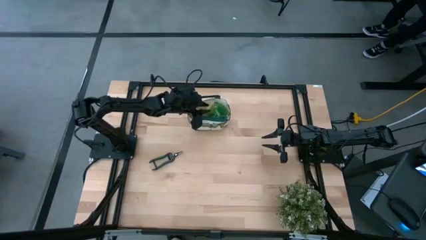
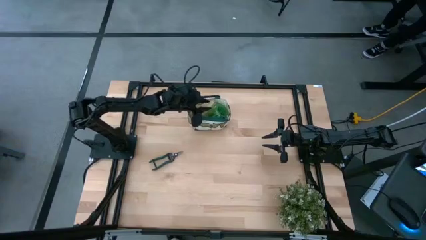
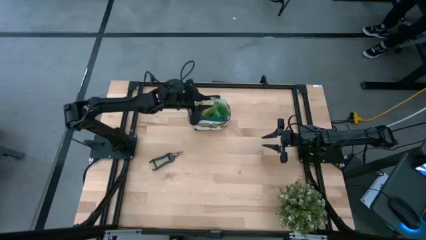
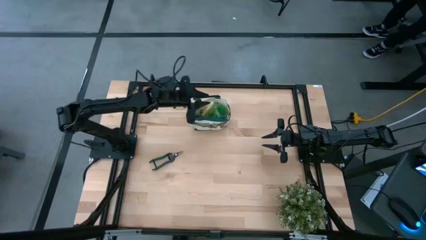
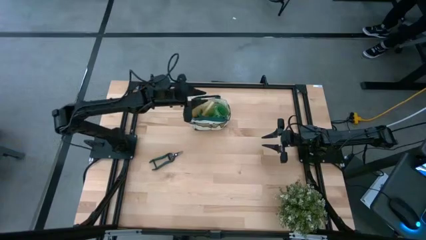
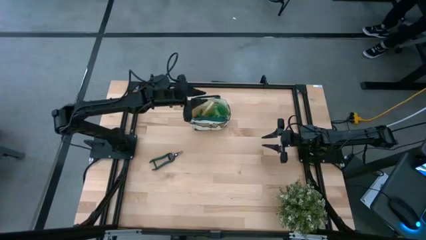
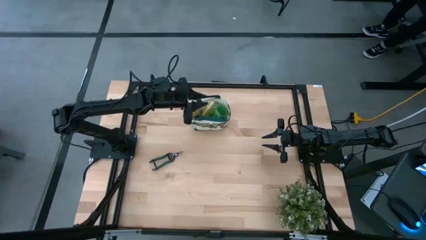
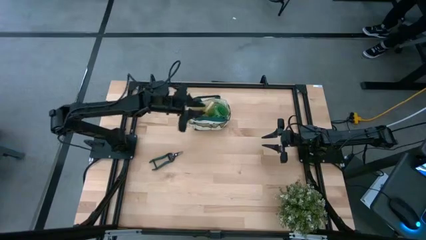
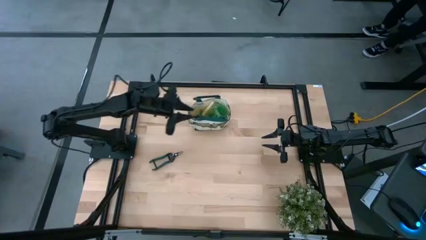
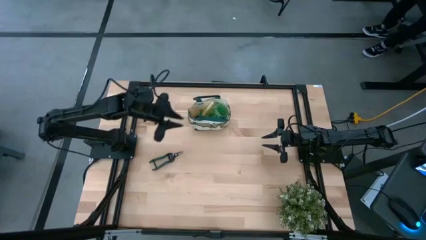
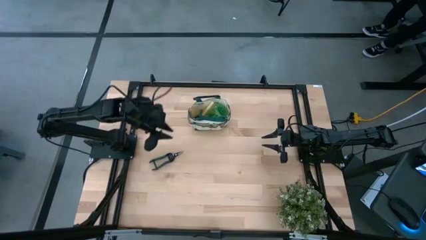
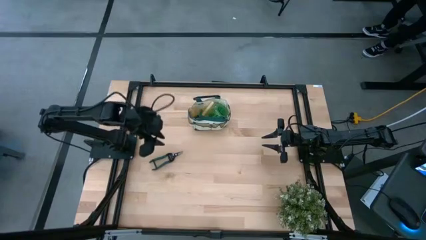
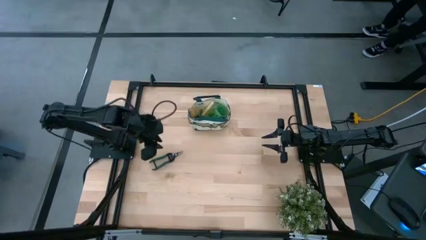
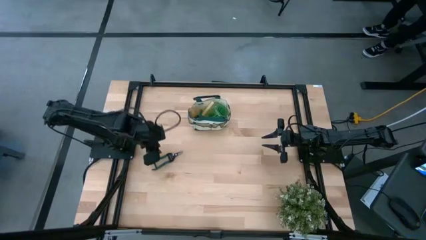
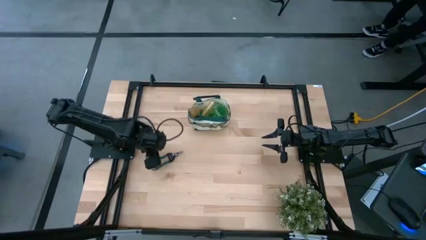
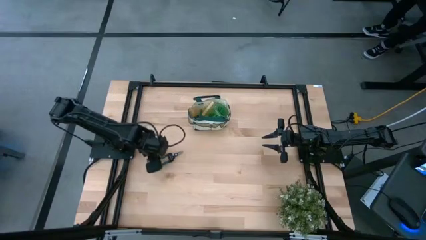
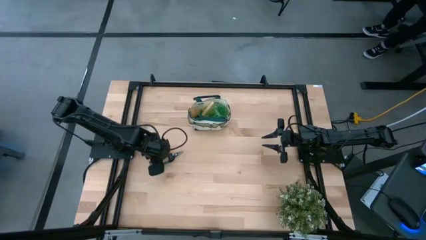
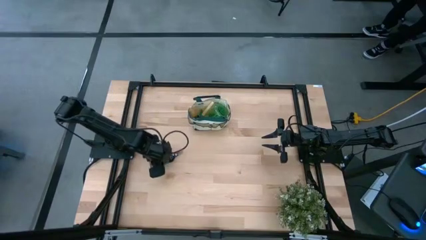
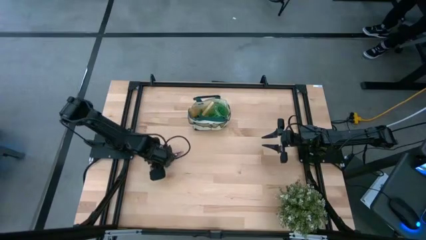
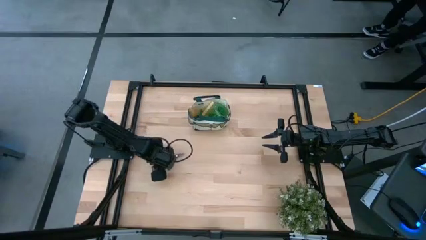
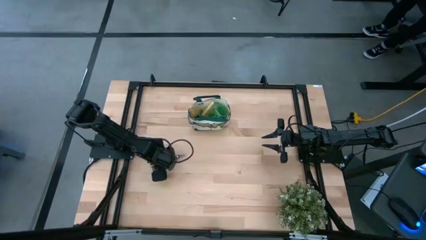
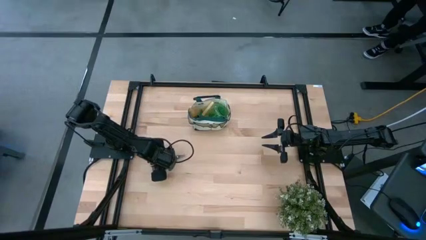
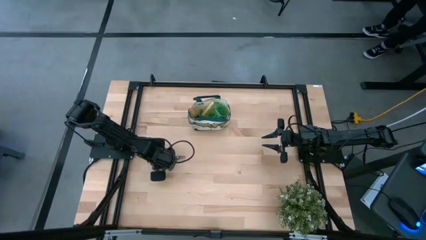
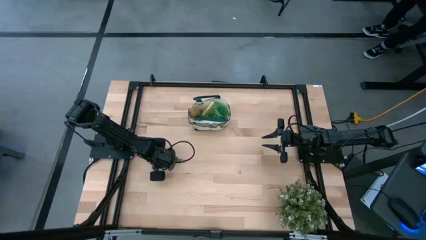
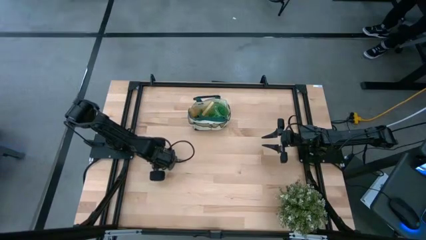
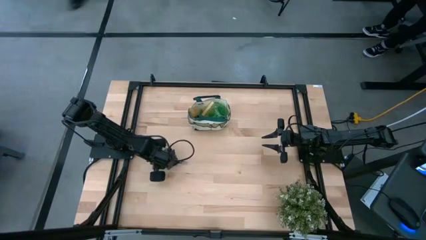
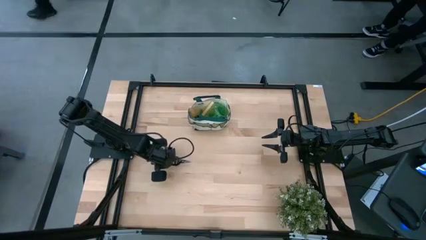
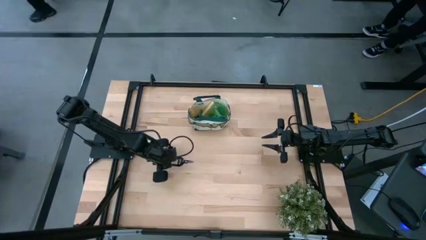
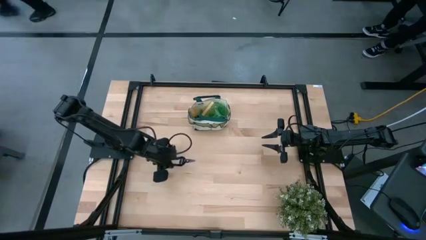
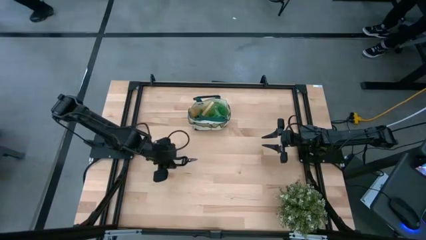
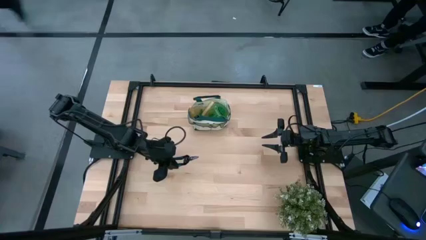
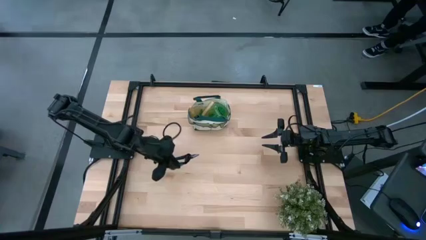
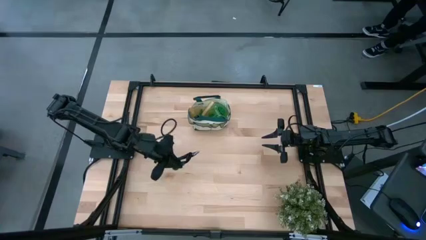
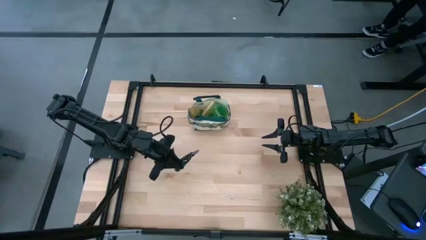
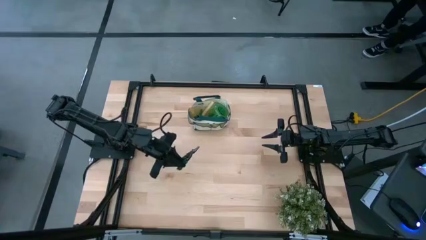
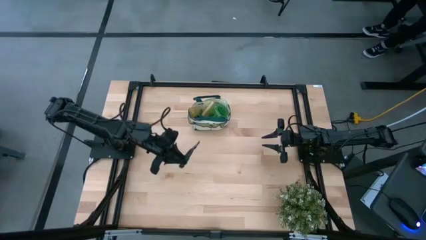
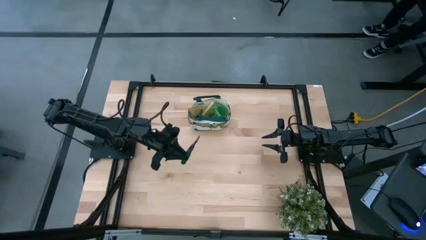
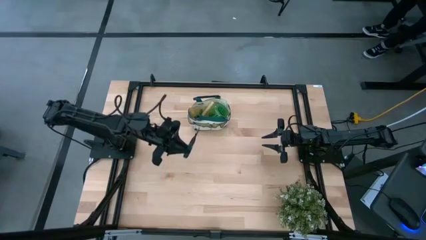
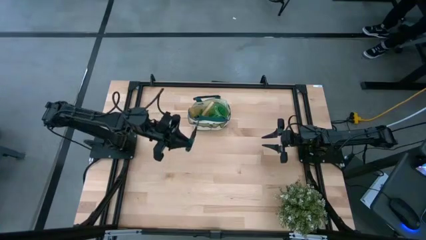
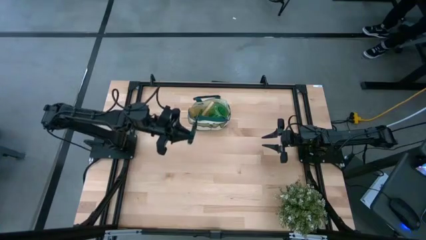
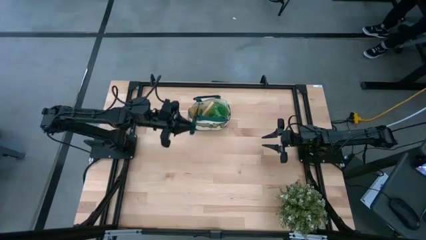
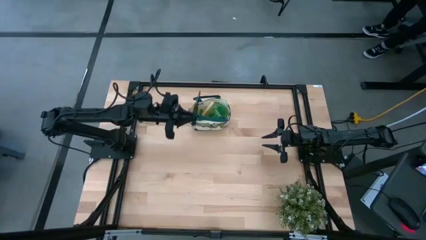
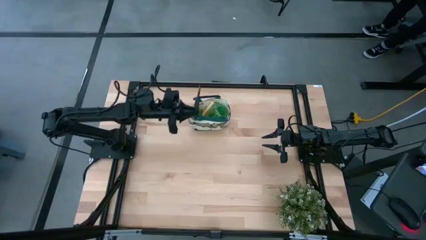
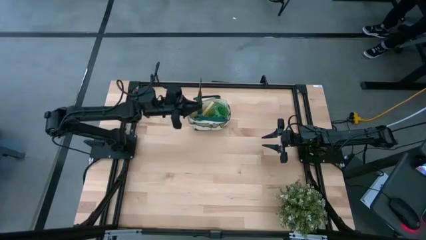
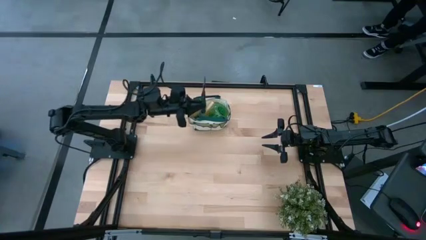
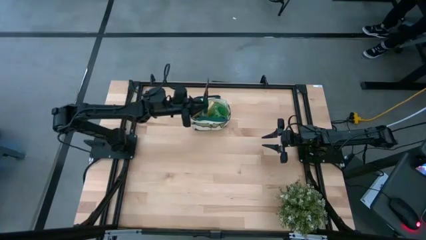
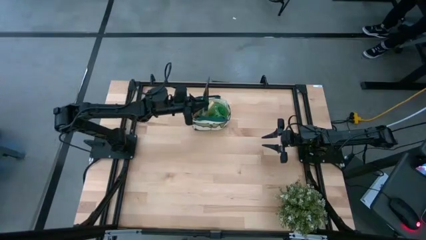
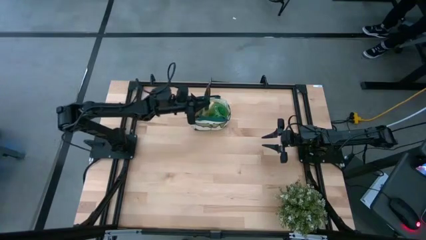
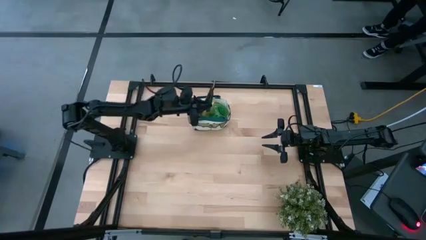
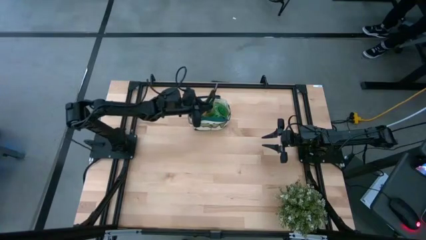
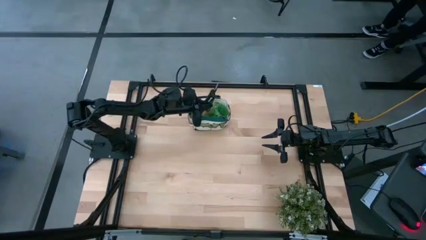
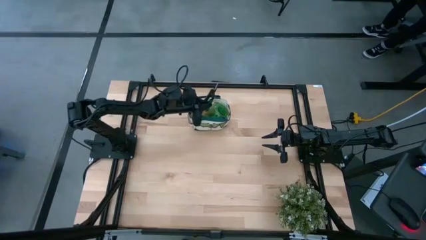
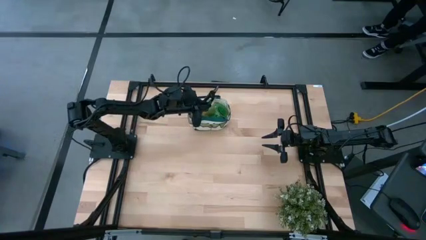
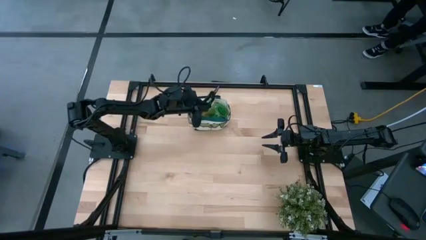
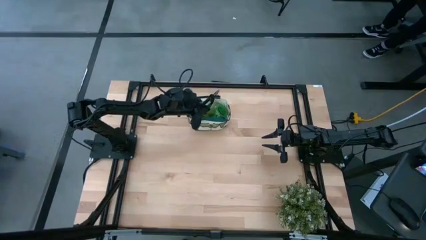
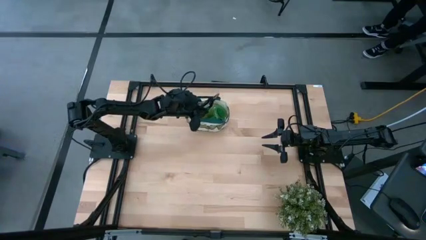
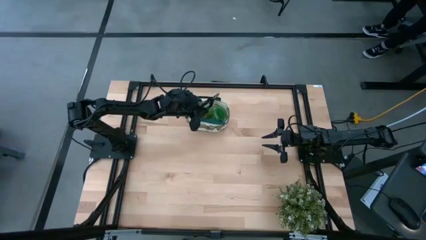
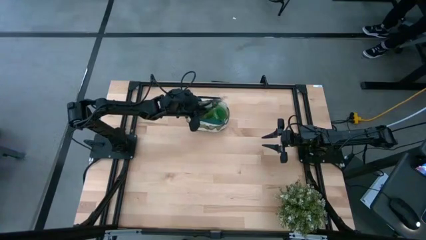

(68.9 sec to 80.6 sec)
Task: Pick & Place Garden tools in Gardening bag
Put the green shear scissors into the gardening bag

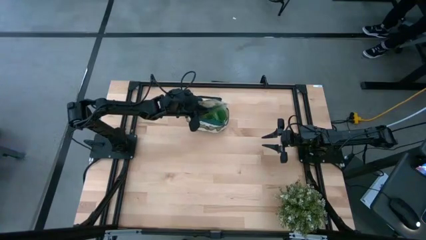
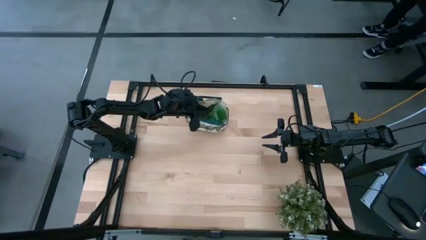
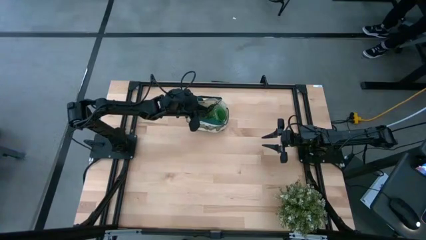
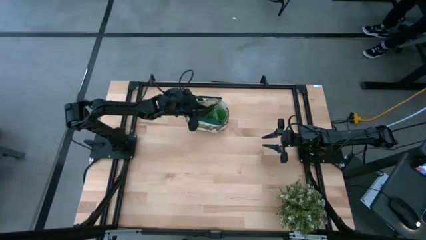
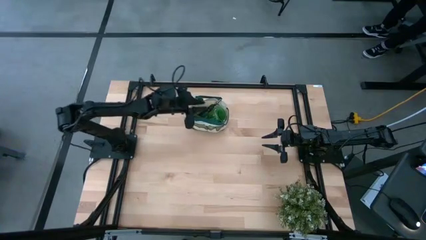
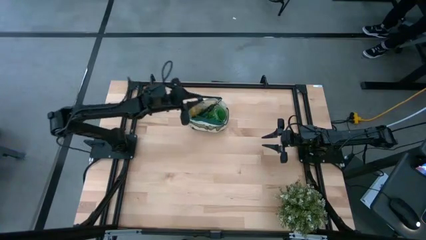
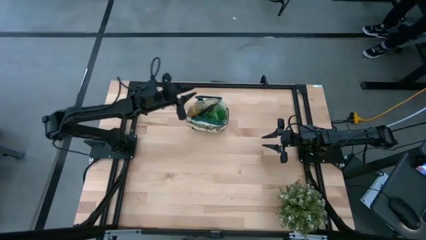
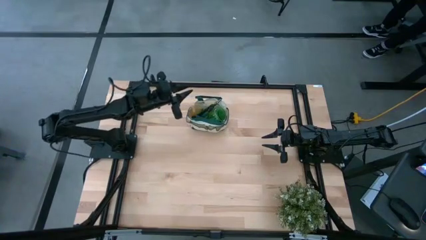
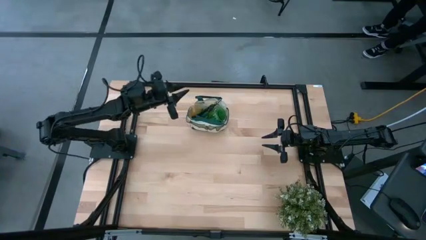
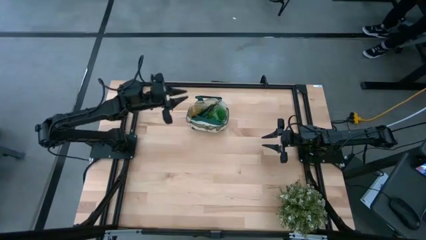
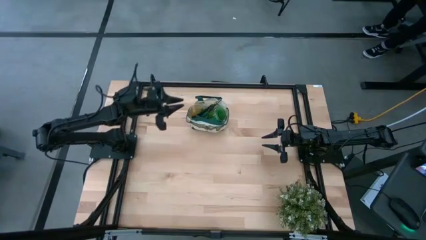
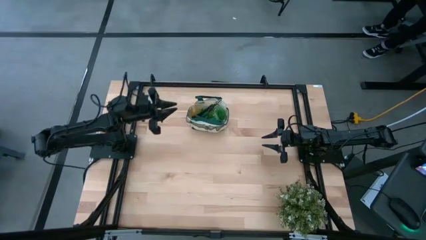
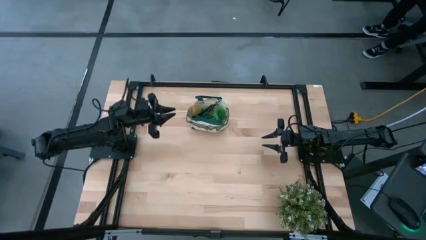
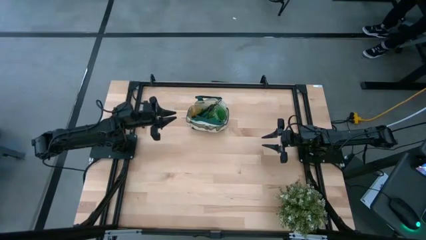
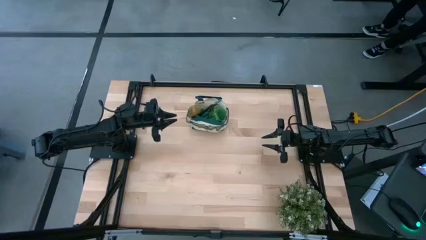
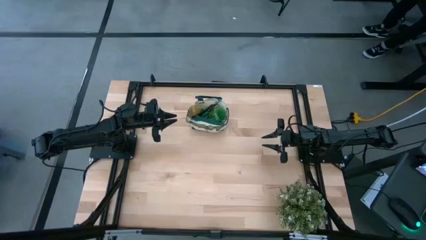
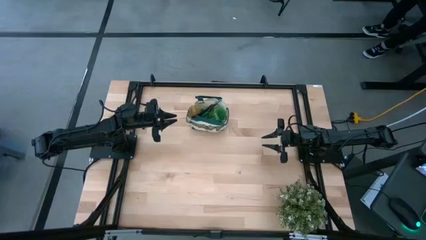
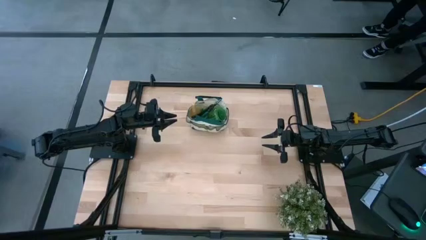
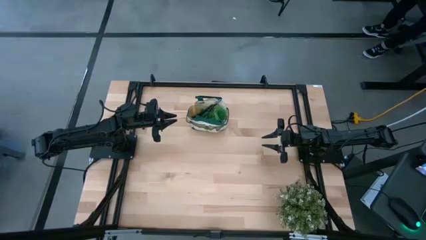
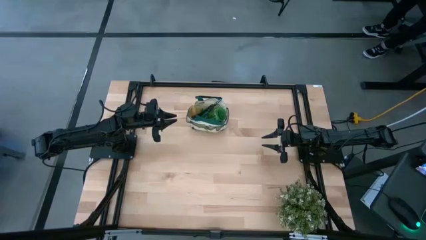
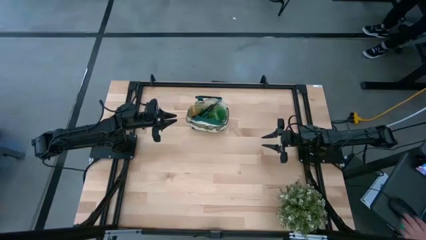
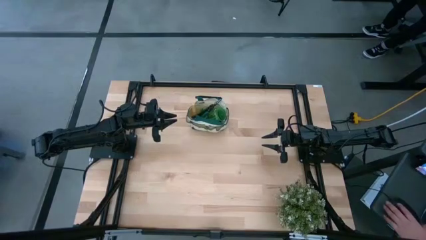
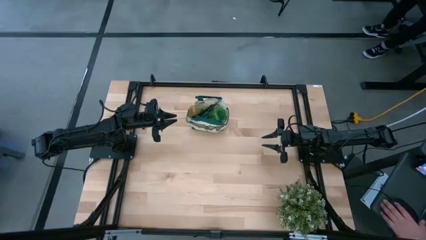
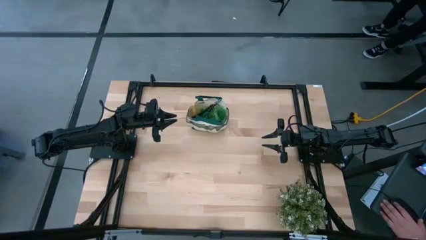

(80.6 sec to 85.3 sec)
Return to Home Position
